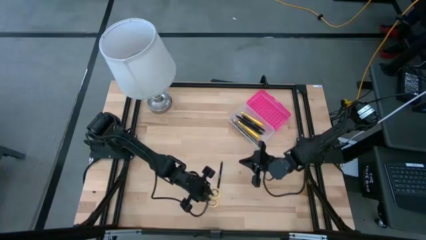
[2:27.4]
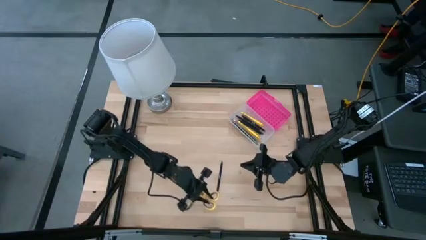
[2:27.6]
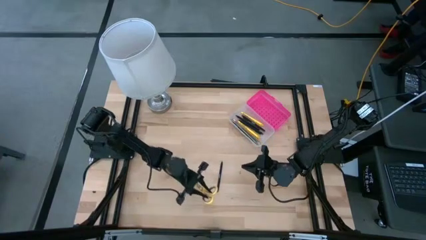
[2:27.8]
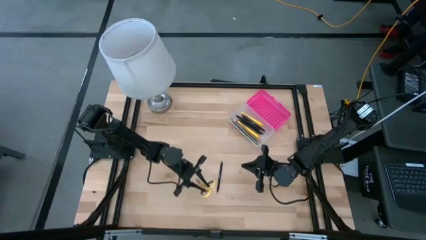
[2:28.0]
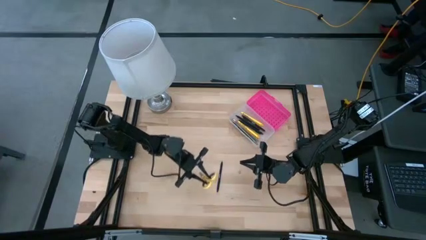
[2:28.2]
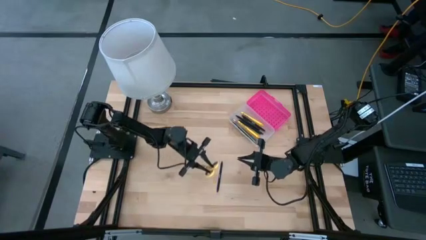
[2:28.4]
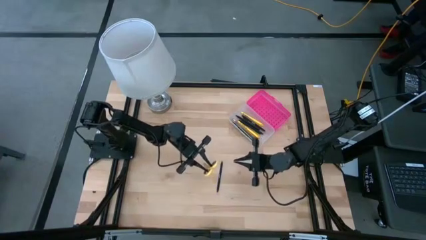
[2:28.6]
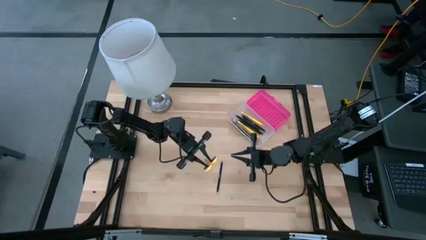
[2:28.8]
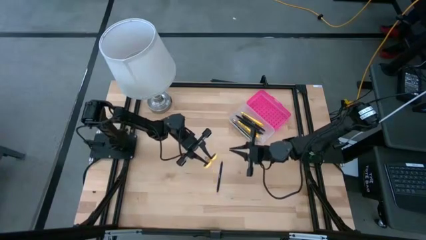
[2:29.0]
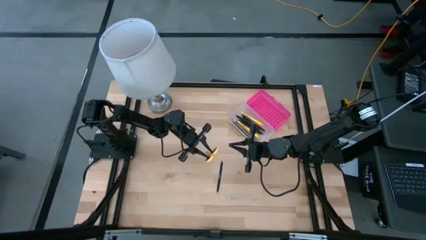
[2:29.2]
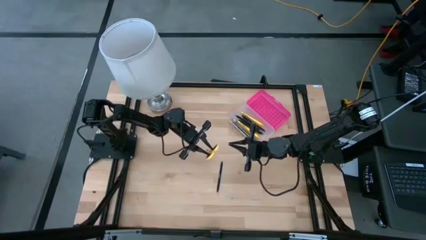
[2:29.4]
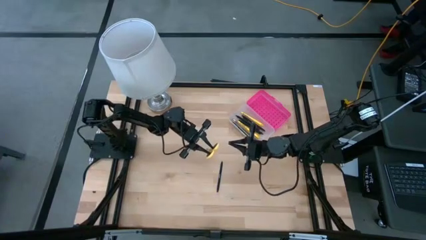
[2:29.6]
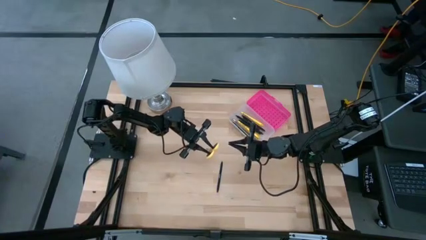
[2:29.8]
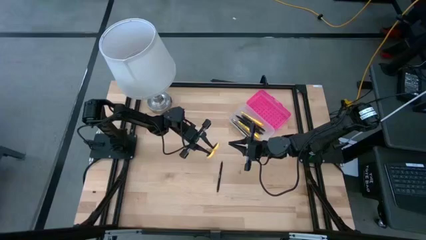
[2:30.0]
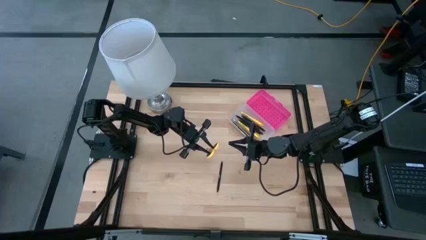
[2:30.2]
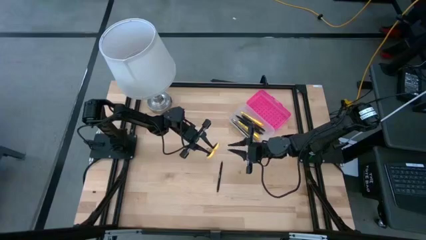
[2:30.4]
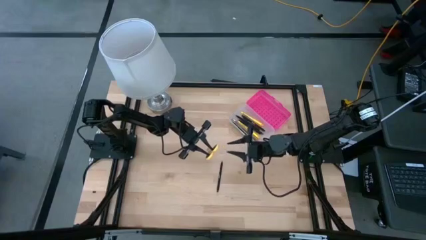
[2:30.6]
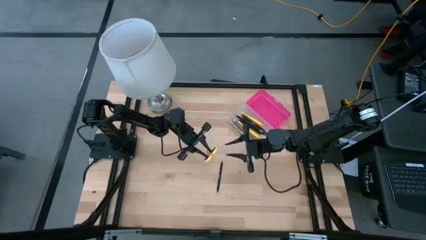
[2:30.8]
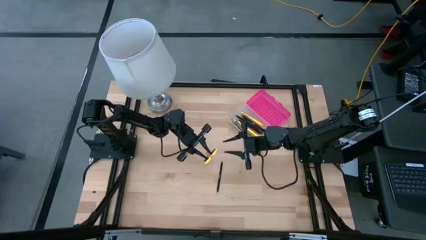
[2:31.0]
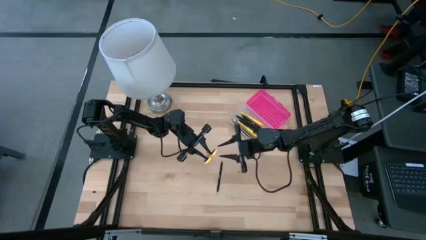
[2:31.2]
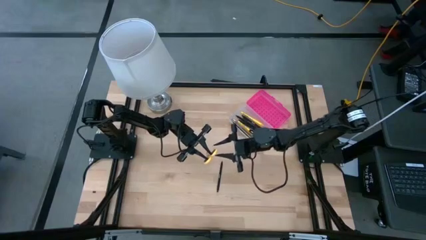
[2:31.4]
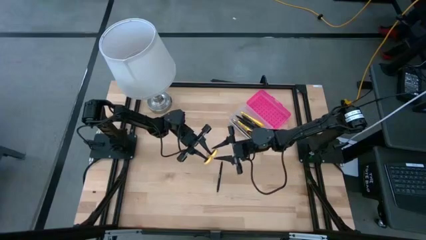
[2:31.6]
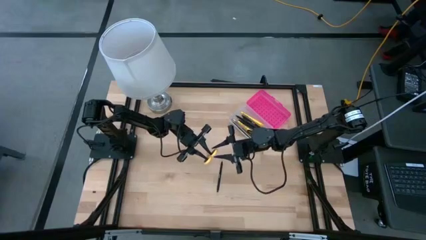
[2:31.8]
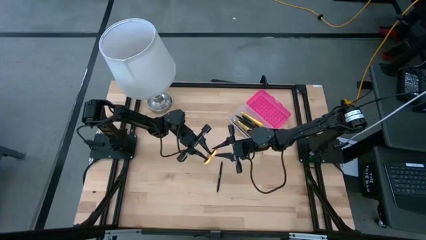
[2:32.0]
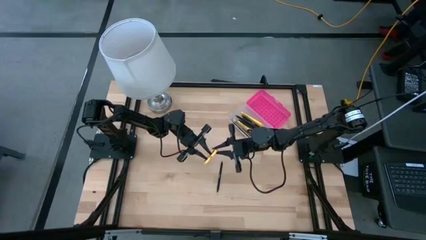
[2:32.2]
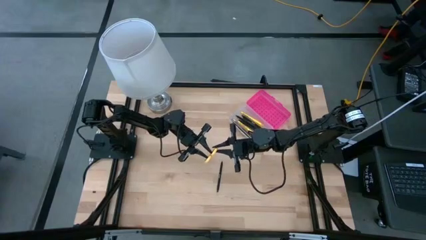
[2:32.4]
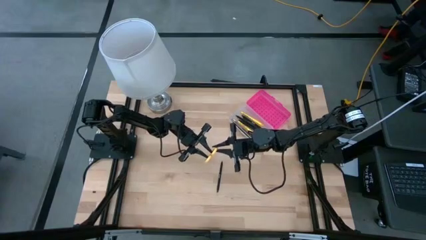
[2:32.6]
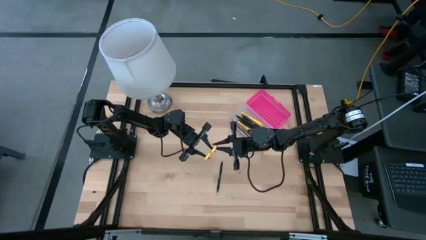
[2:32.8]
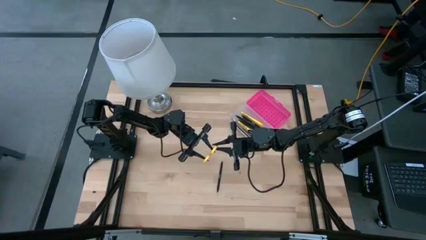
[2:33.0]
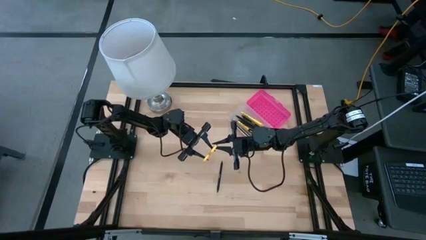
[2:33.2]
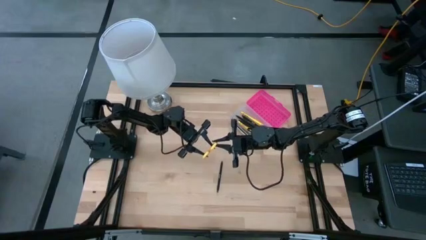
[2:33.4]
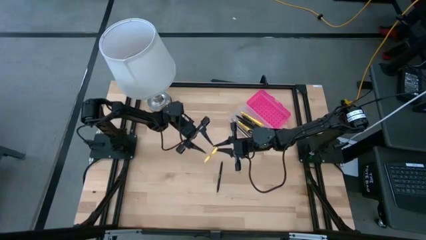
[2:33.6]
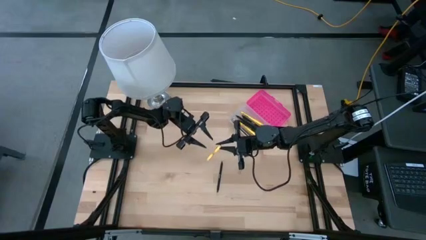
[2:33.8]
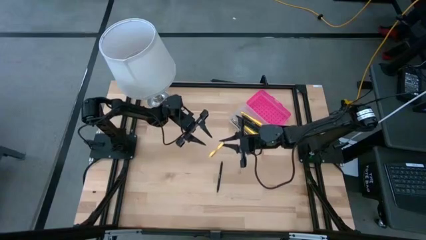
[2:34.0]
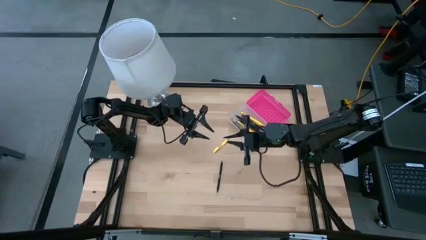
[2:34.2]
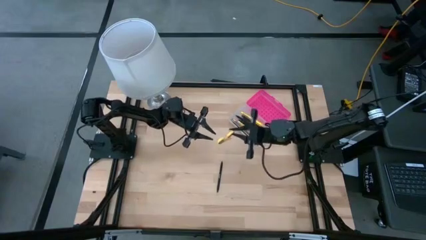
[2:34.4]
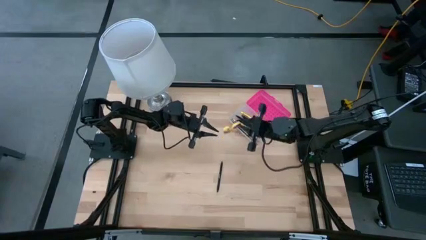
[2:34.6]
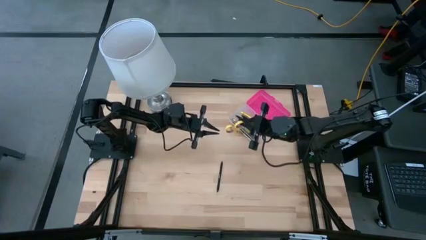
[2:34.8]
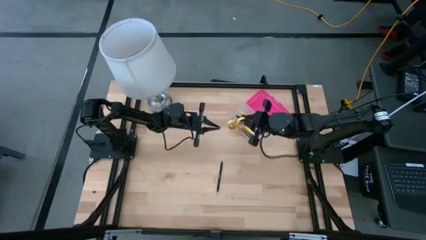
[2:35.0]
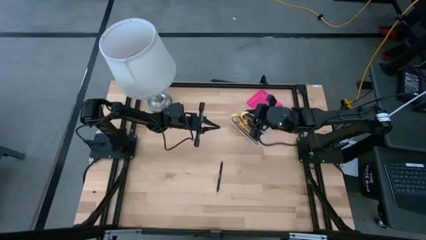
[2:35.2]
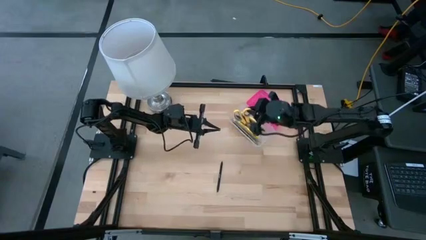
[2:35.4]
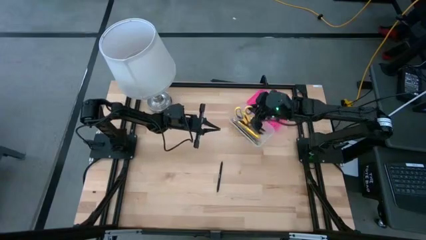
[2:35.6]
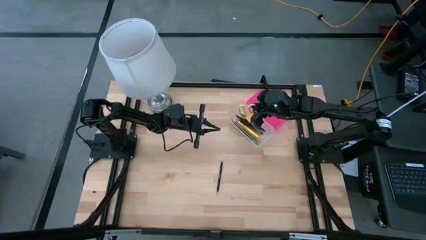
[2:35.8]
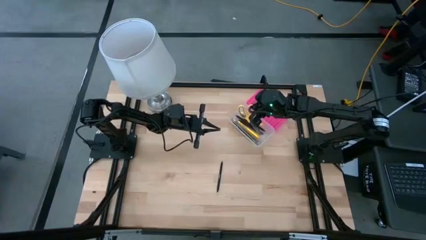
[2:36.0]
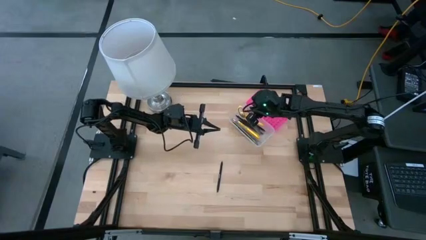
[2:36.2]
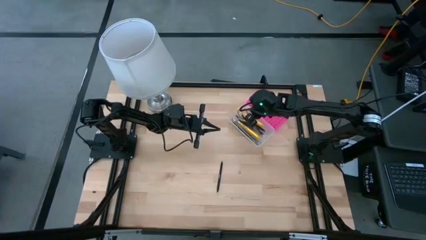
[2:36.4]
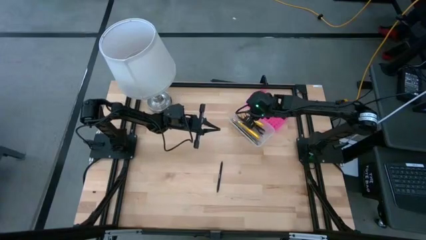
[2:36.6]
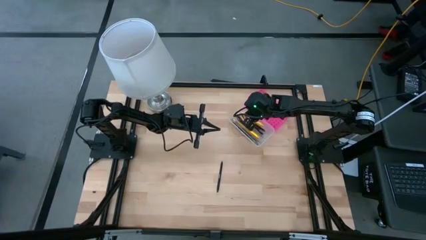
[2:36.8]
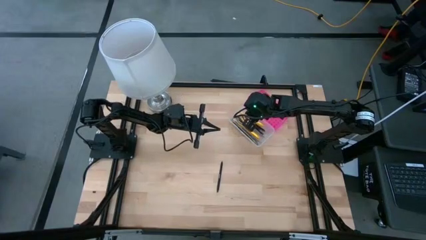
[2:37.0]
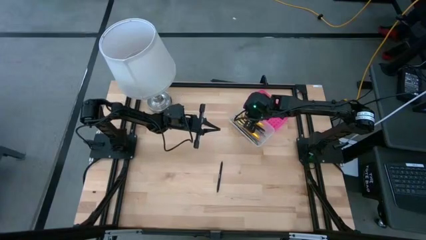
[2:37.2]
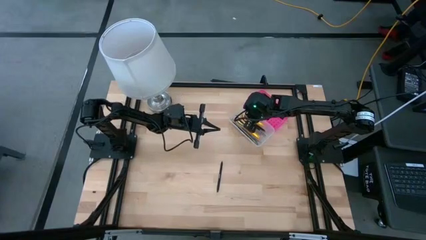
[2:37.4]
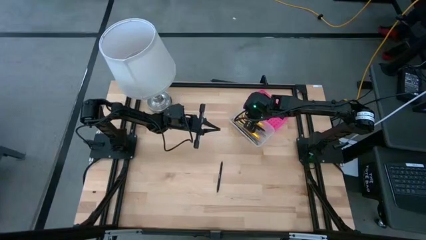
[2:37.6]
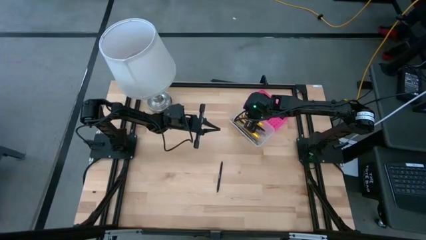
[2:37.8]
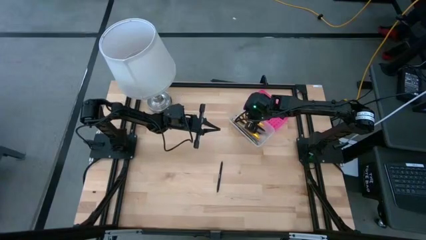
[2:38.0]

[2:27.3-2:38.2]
Task: Pick & place school supplies into a supply box
Put the yellow scissors into the pink supply box
